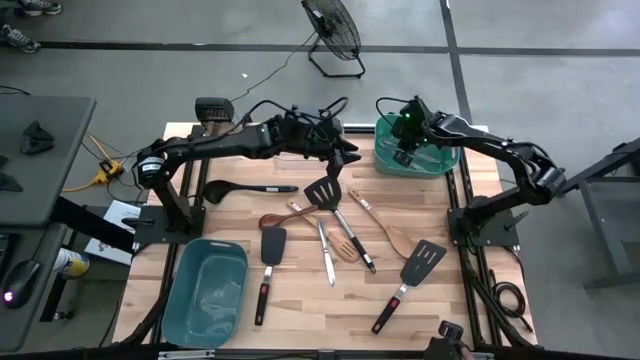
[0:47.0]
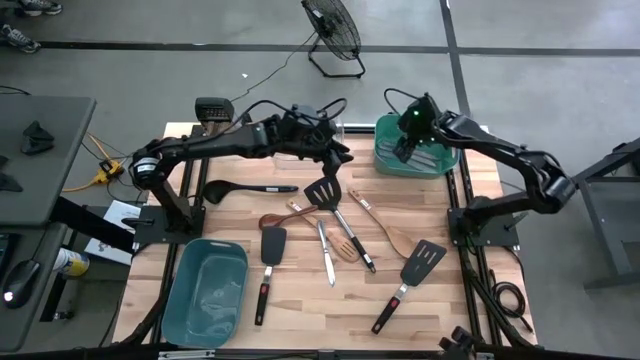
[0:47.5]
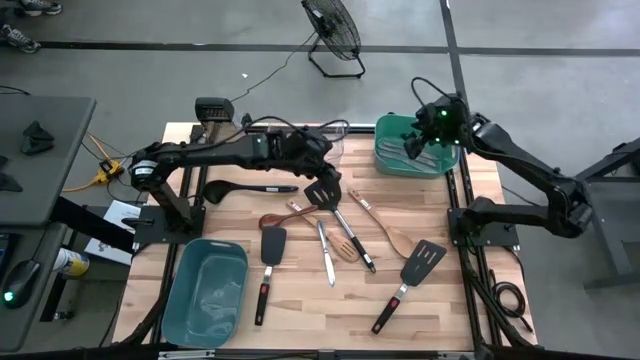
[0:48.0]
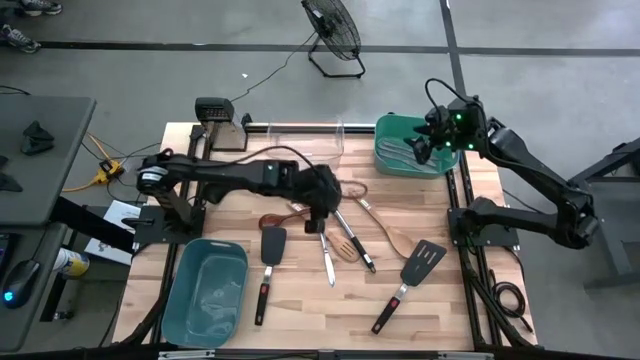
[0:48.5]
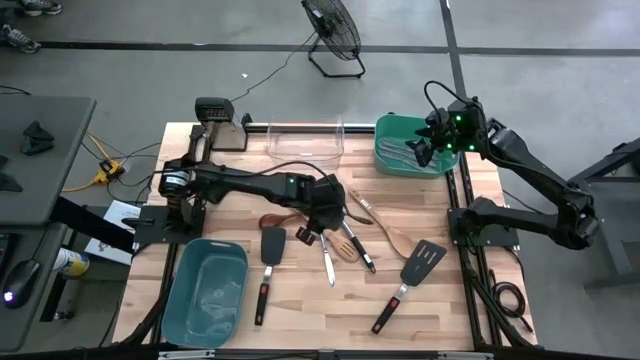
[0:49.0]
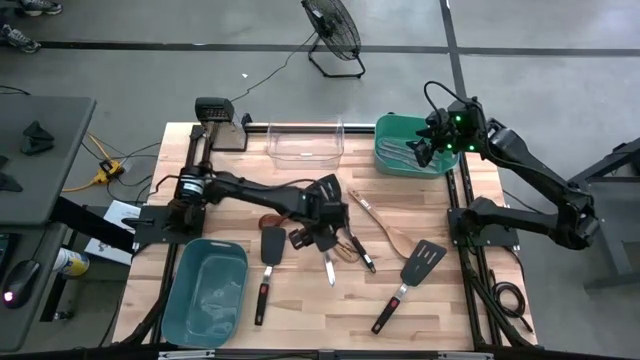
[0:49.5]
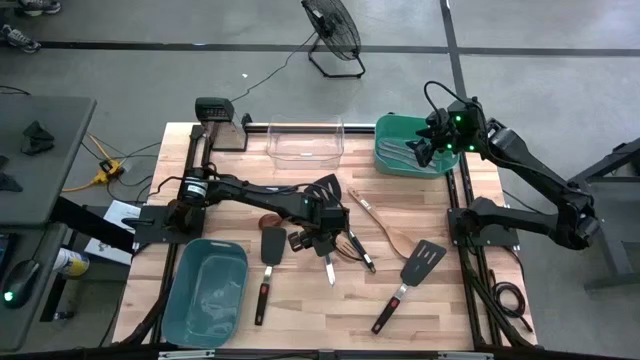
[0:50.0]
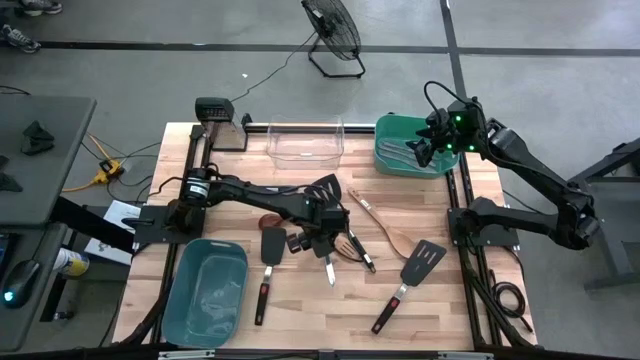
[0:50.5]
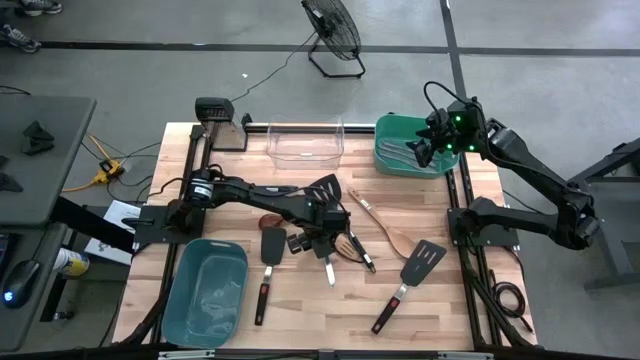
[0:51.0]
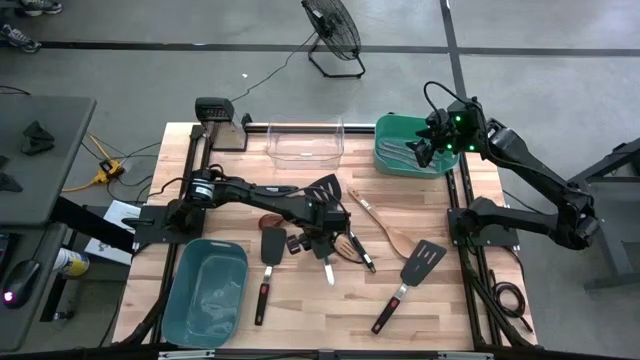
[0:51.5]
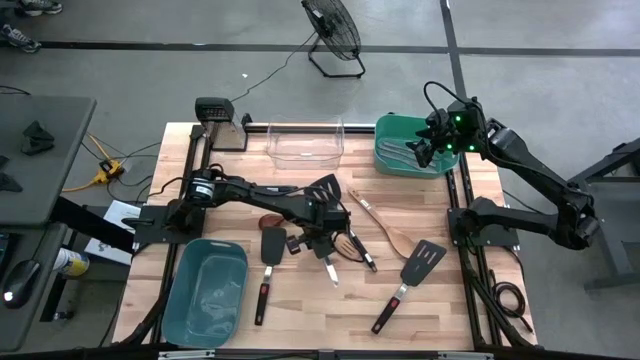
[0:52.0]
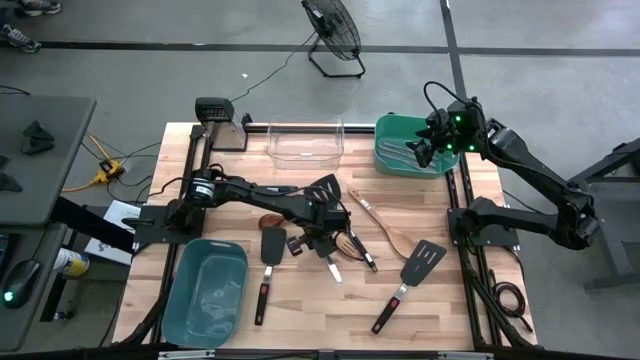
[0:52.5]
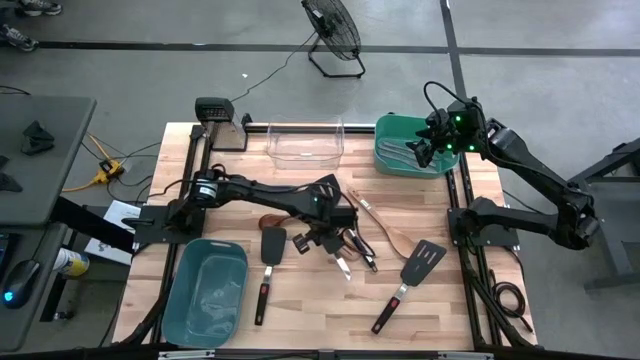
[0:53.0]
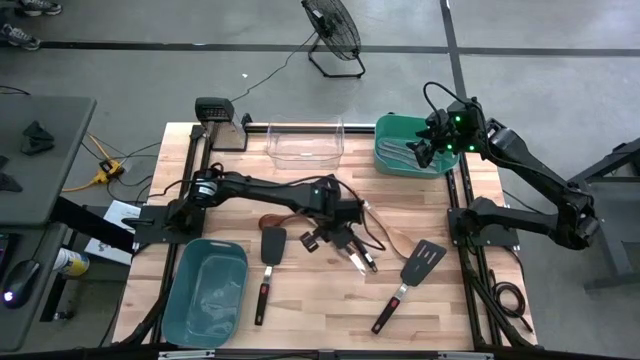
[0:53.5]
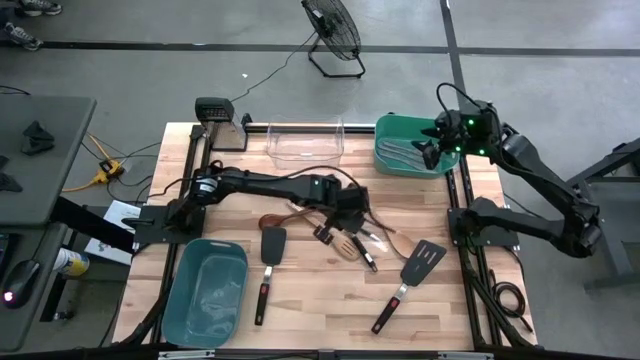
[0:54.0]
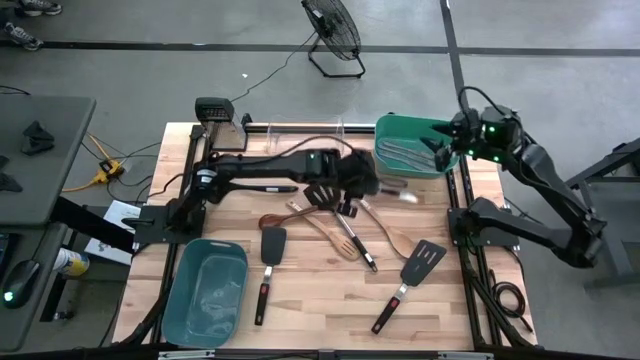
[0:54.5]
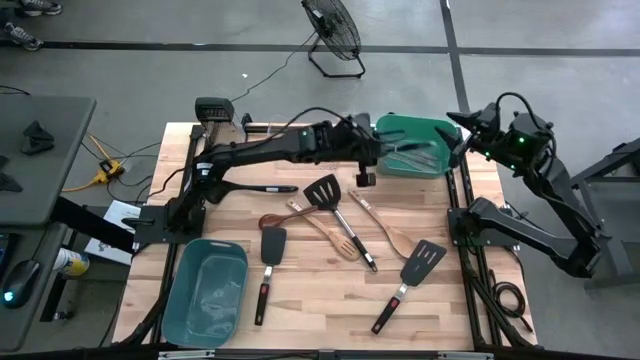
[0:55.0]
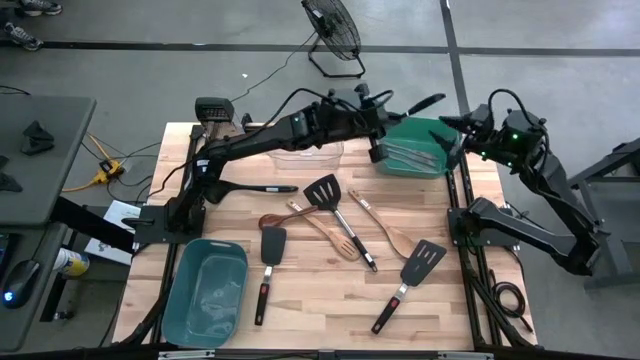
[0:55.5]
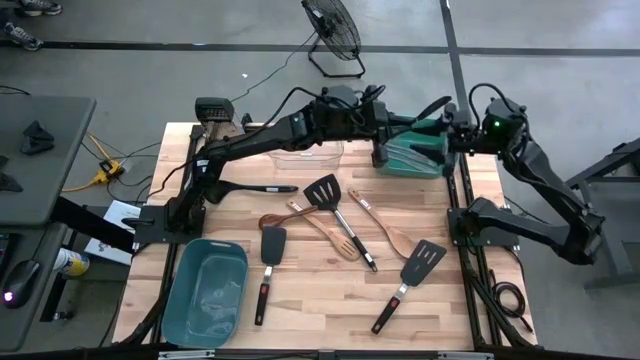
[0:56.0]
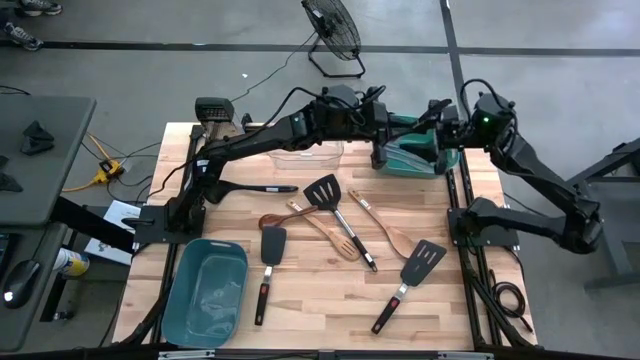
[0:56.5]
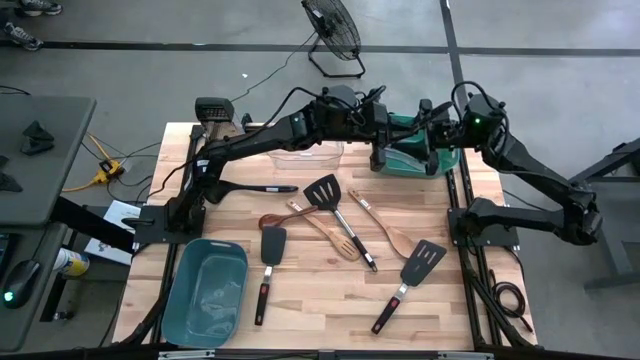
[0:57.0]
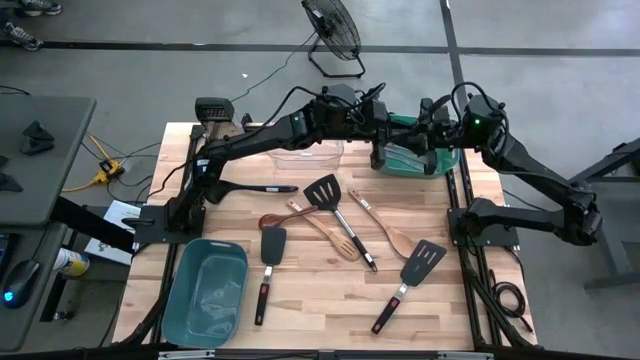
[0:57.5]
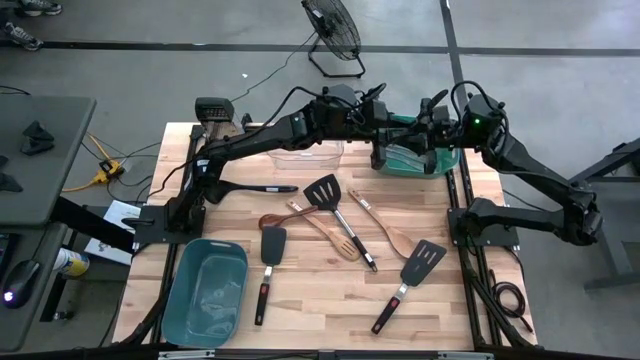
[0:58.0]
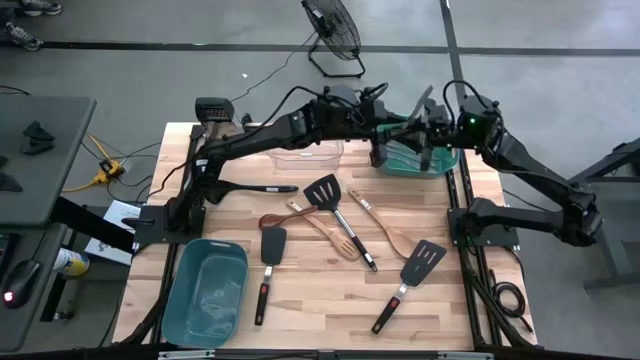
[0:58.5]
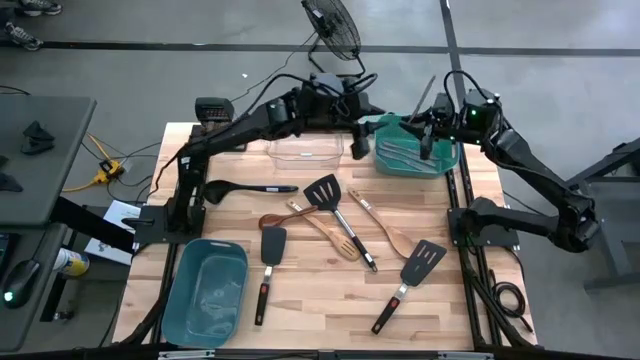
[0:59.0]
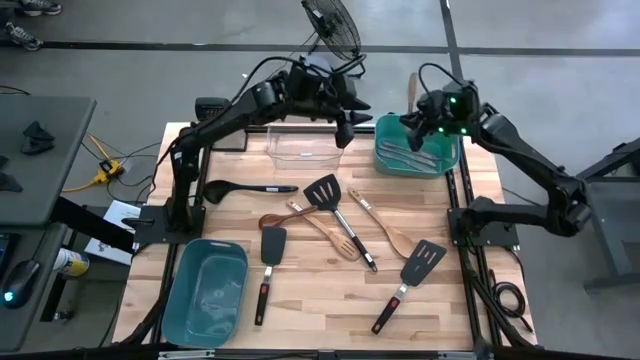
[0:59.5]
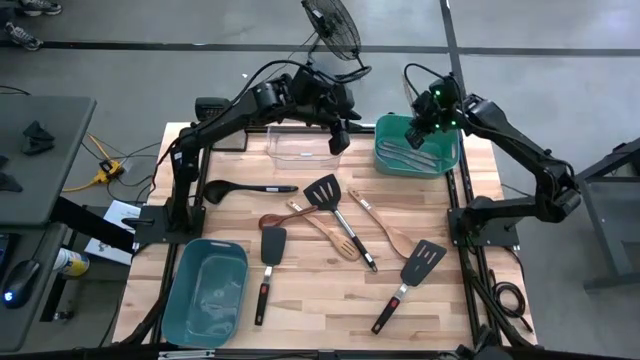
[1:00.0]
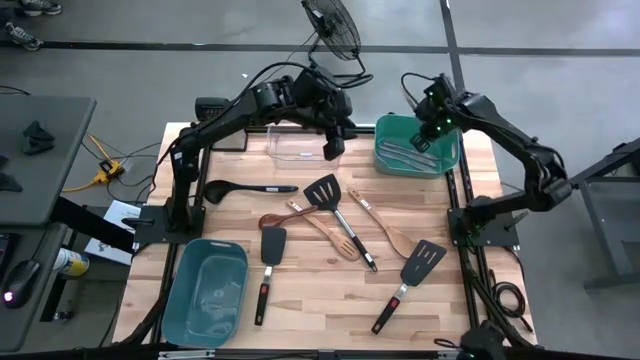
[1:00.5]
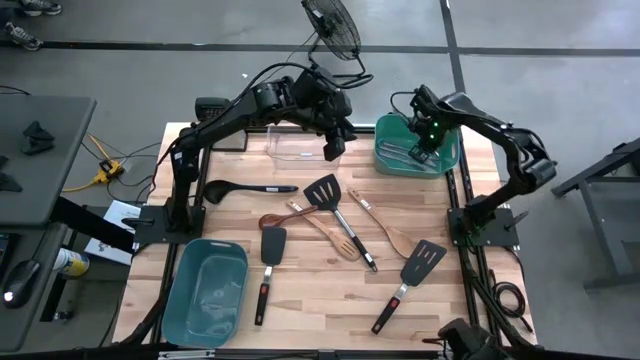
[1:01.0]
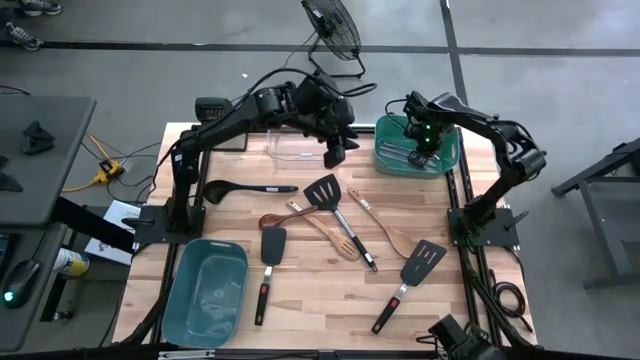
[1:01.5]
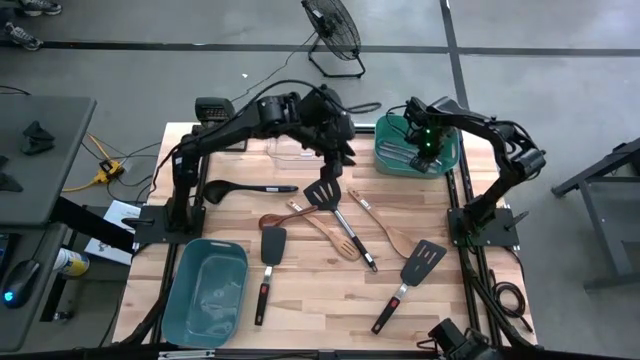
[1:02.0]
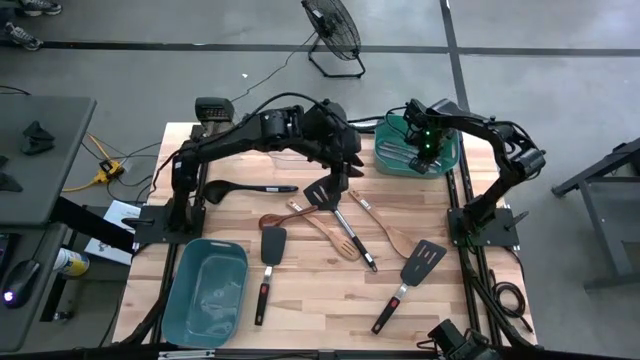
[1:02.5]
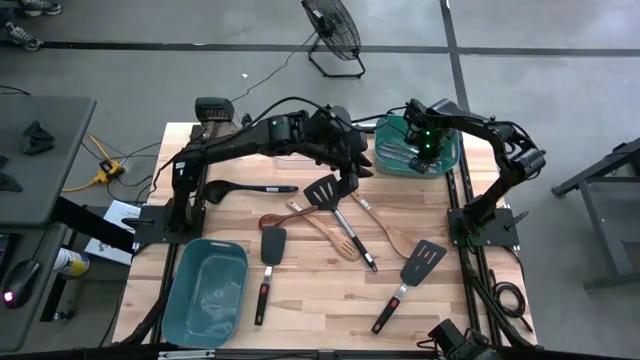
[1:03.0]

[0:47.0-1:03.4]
Task: Pick & Place Kitchen Items
Put the dinner knife into the green bin

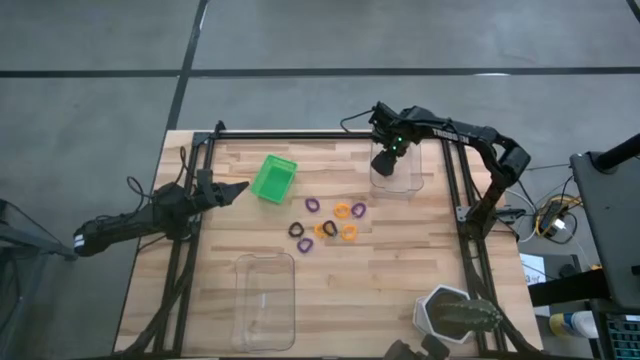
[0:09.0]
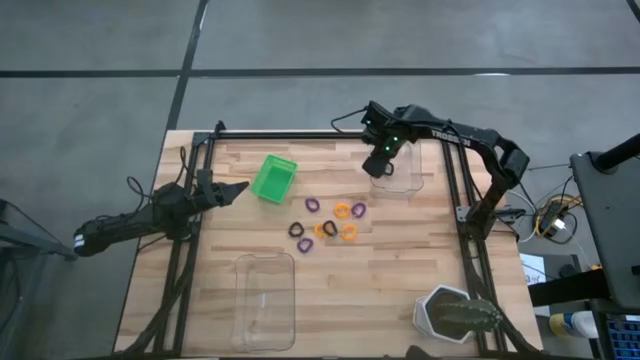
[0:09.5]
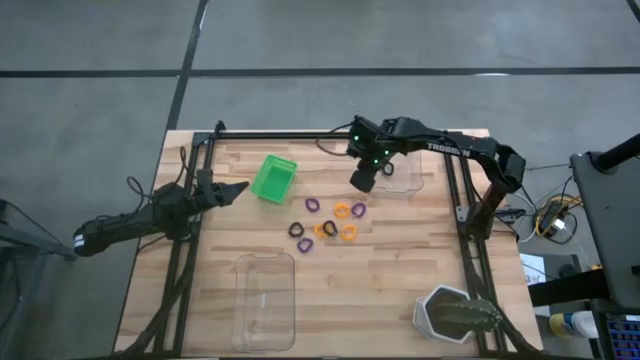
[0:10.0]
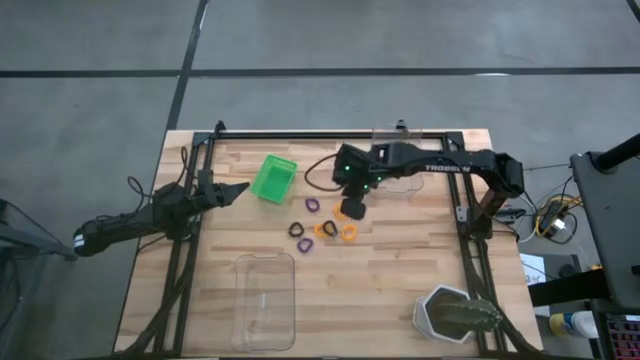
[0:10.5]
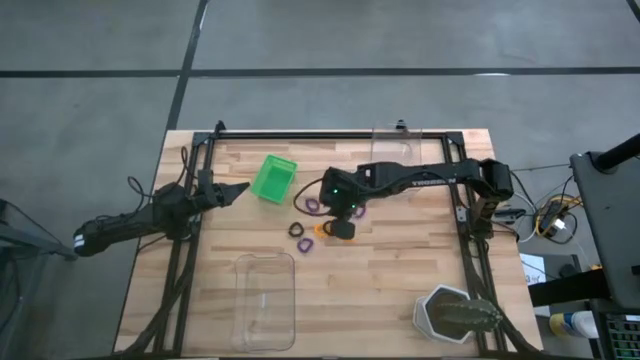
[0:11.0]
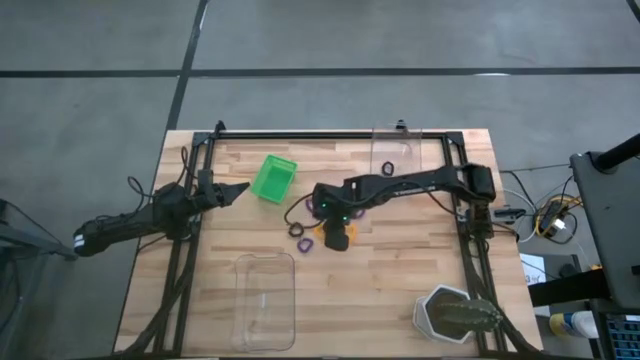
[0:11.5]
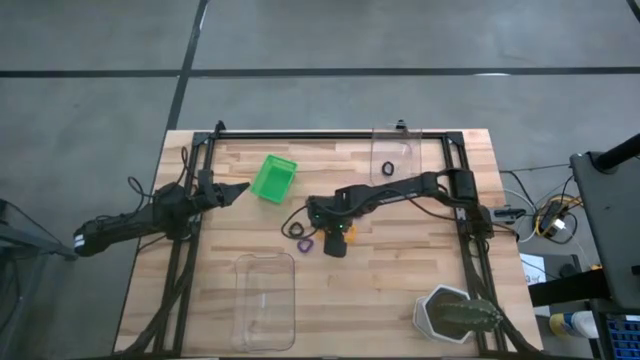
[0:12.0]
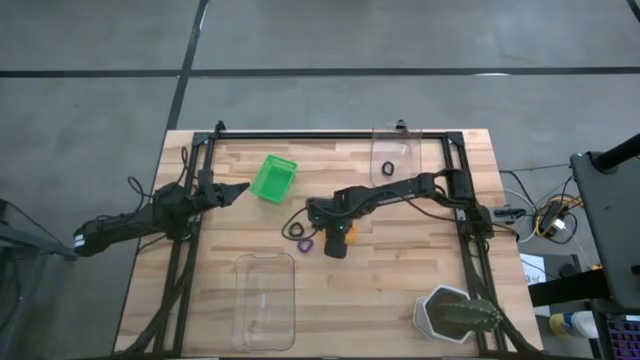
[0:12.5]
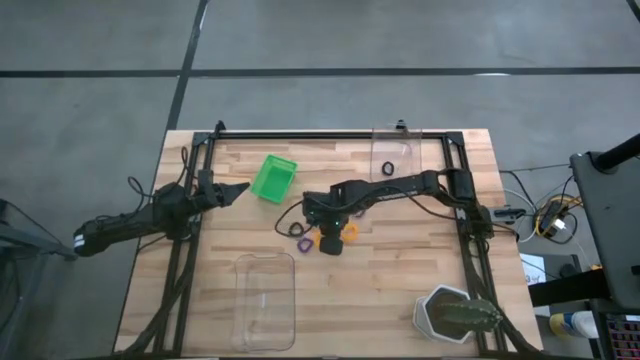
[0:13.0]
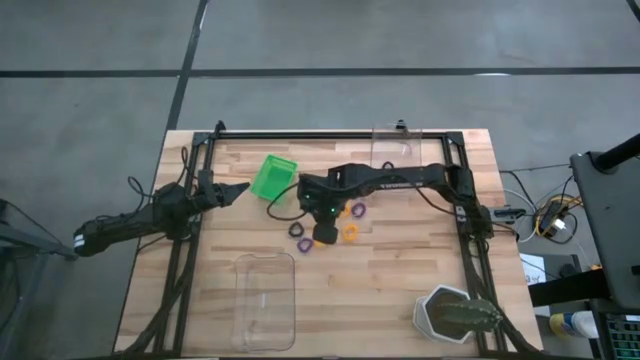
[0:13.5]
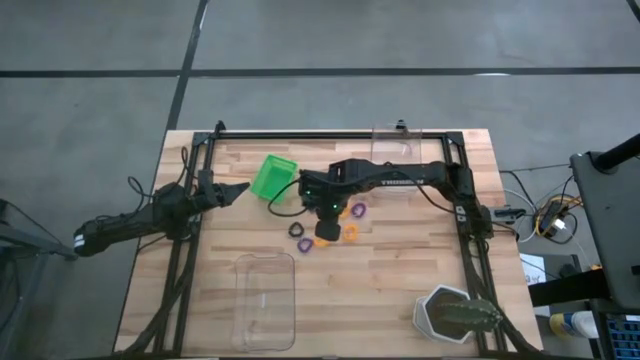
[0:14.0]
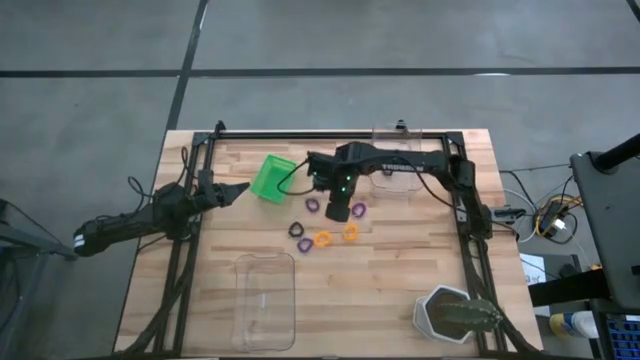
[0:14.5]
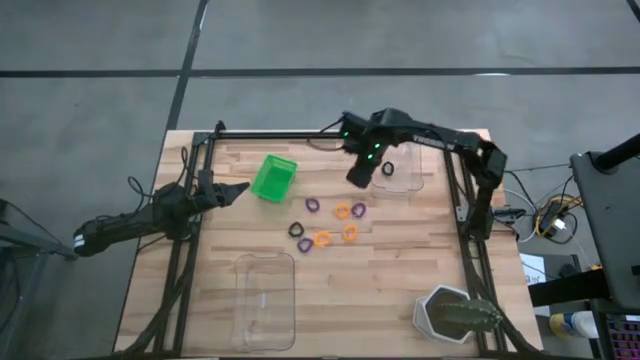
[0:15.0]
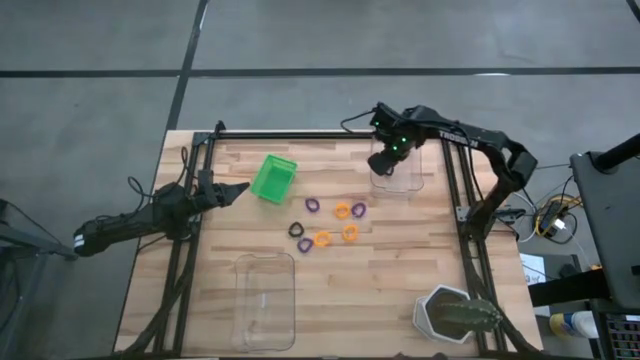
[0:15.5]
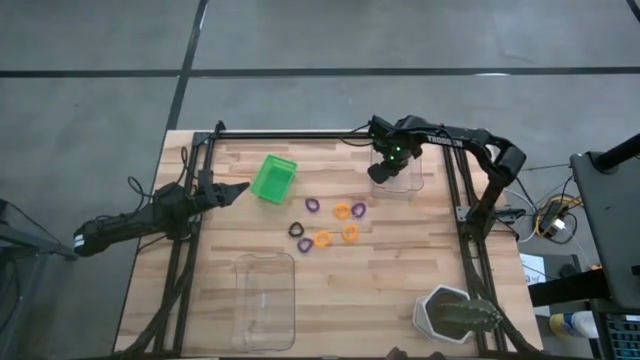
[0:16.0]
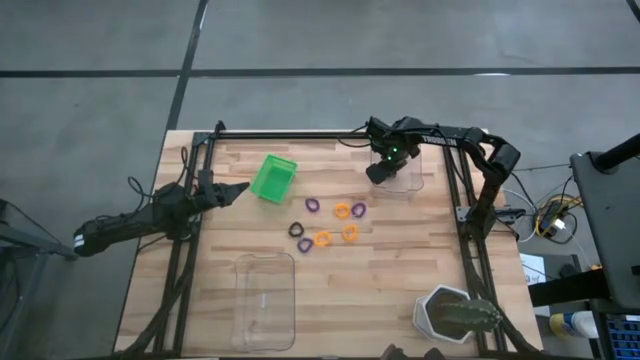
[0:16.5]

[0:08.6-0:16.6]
Task: Sort spring keychains
Put the right black spring keychain into the top transparent bin
